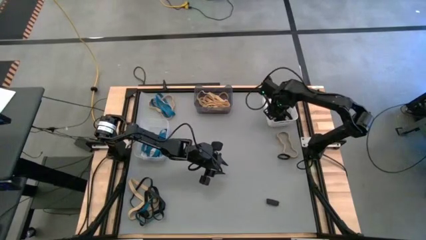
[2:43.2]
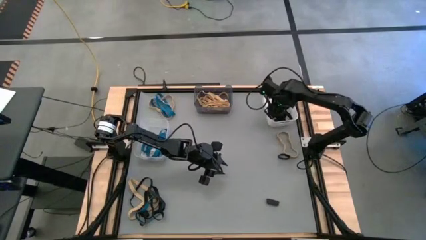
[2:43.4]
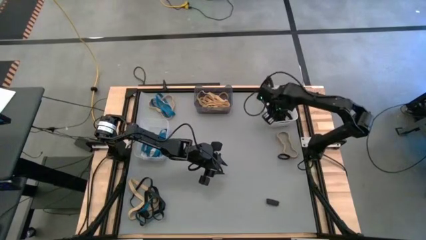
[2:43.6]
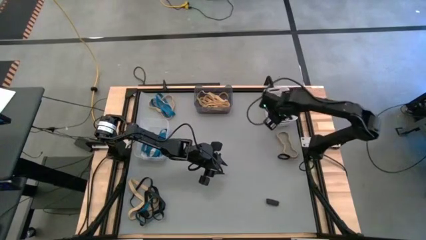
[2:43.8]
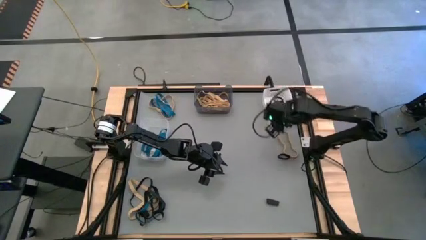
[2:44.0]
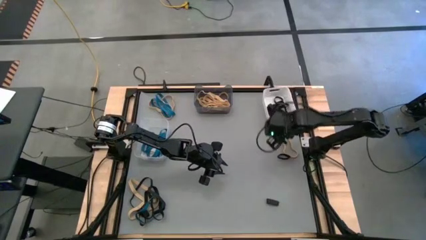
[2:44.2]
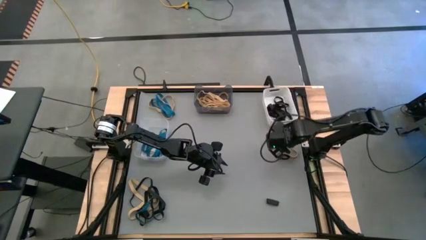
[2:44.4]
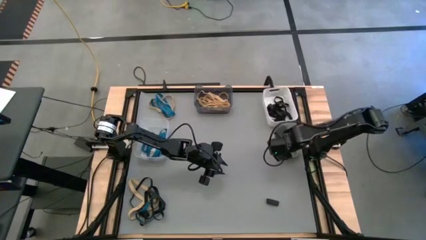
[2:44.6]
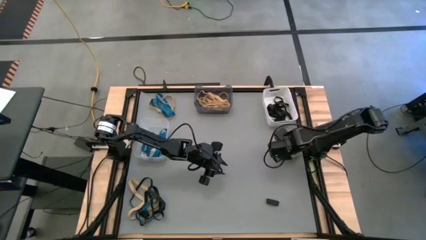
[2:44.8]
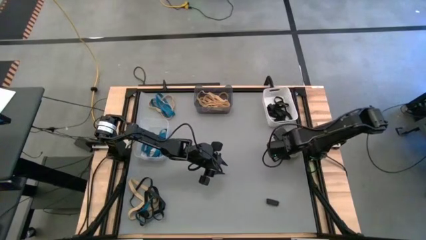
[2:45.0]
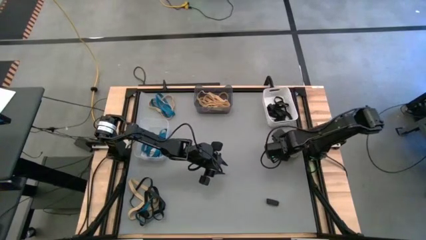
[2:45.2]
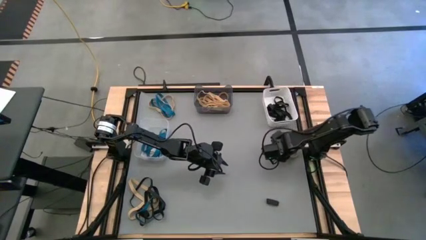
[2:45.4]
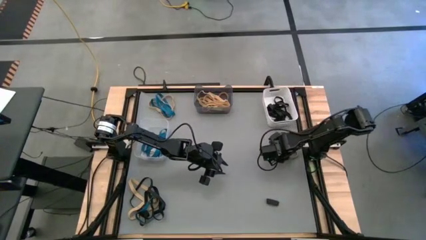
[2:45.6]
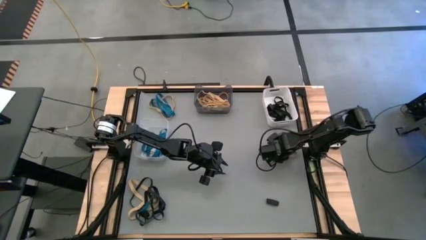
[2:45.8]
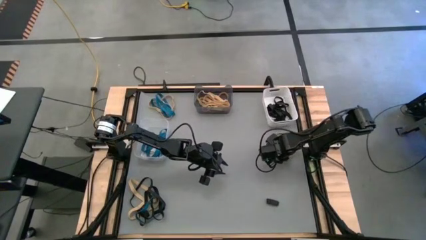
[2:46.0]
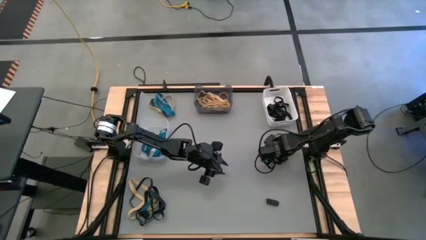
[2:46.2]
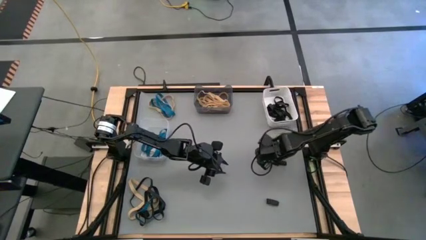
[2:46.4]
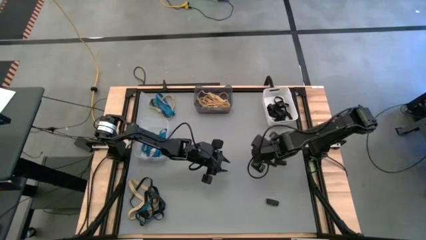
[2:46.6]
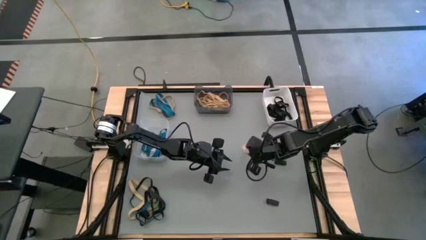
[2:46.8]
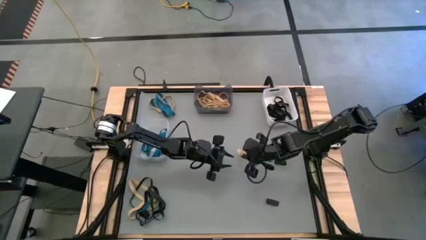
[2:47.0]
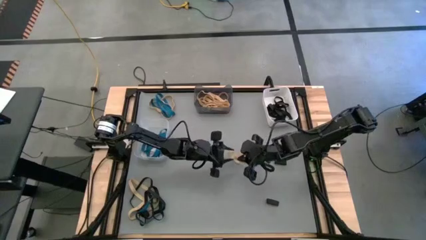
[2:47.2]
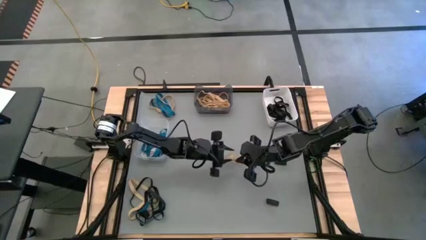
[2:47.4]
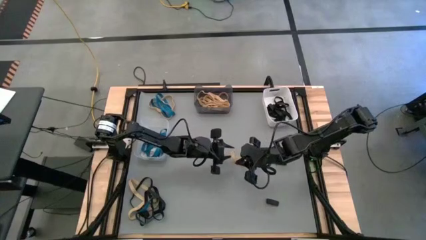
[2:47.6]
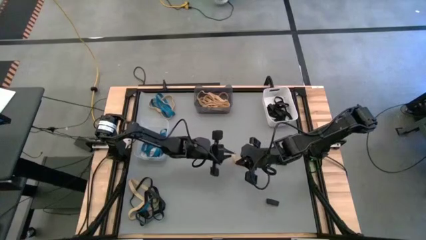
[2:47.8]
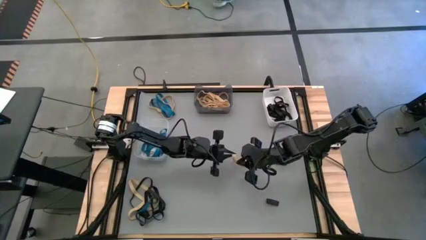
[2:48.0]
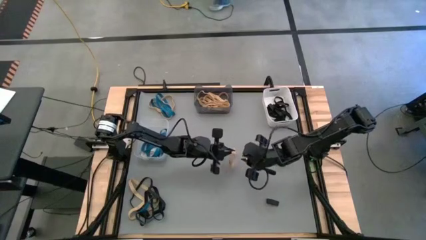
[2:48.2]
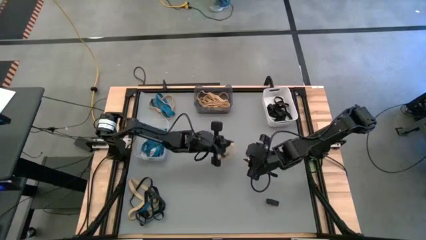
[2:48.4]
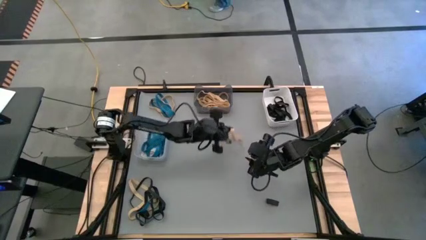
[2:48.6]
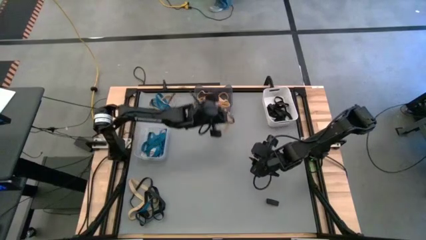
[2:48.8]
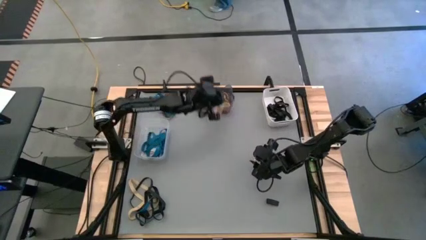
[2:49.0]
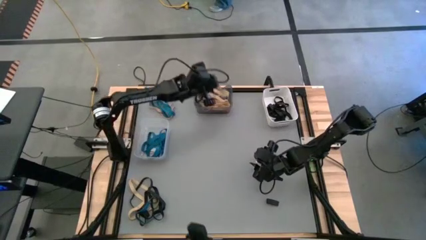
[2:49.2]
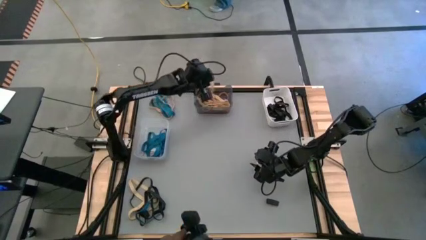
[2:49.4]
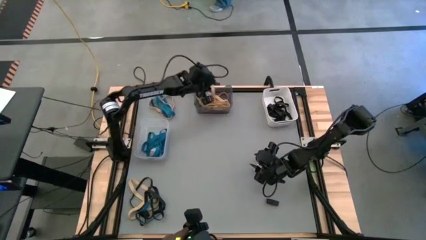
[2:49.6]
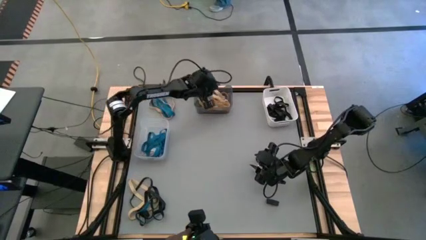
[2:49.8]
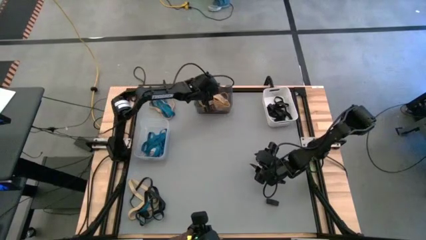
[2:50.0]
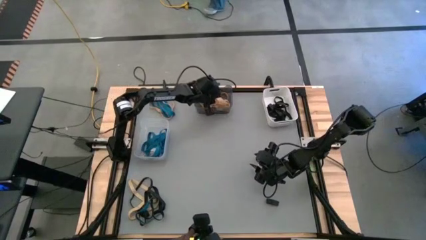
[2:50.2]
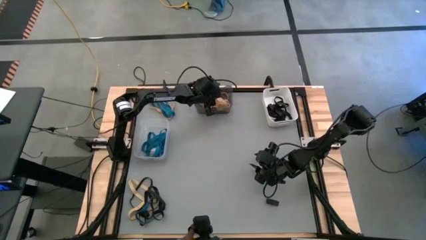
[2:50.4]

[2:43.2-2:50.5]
Task: Sort rubber bands into baskets
Put the brown rubber band into the black bin

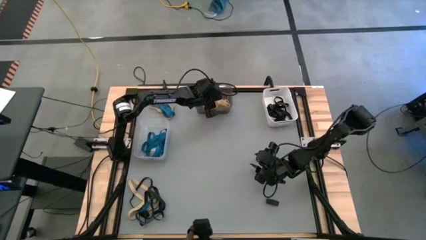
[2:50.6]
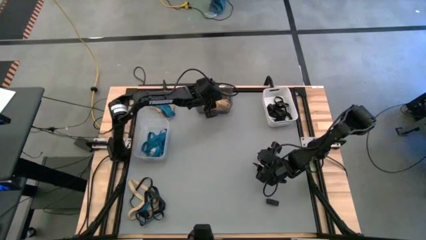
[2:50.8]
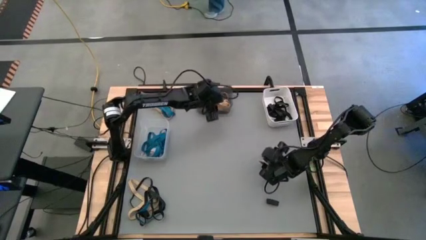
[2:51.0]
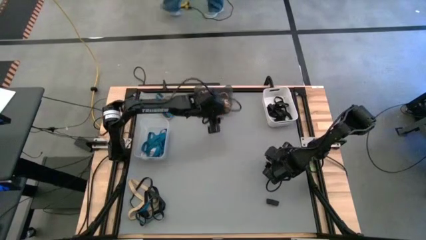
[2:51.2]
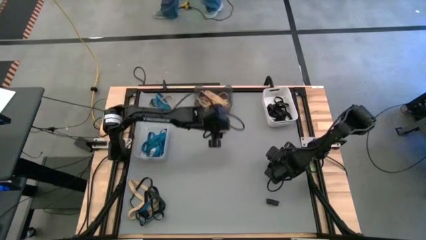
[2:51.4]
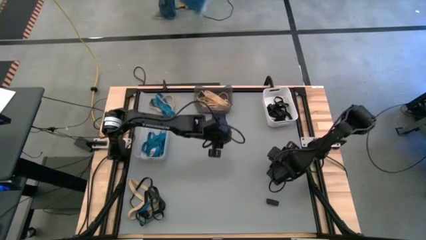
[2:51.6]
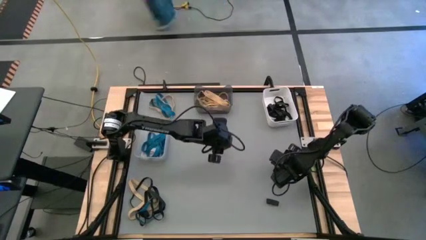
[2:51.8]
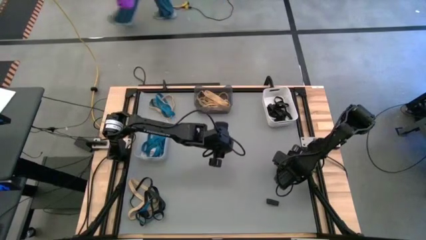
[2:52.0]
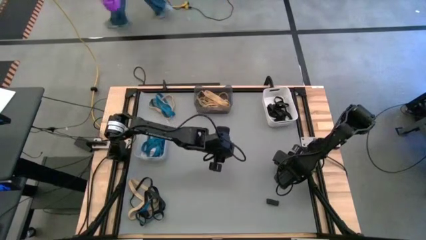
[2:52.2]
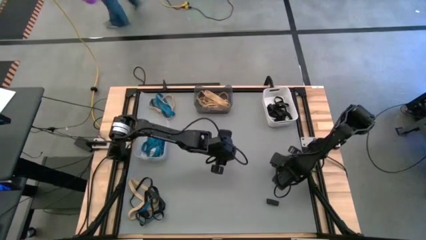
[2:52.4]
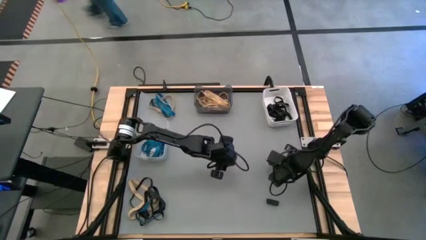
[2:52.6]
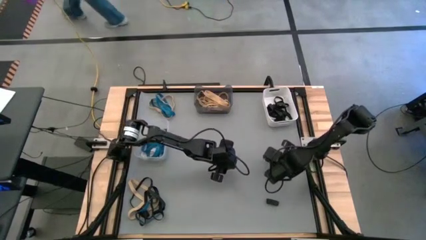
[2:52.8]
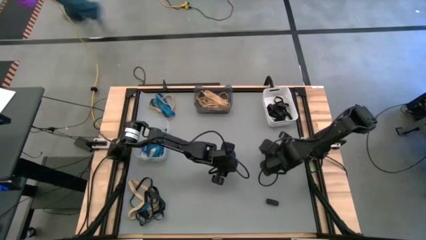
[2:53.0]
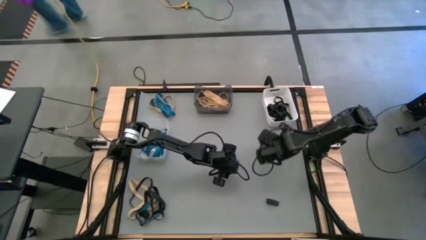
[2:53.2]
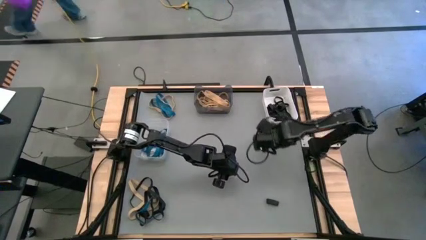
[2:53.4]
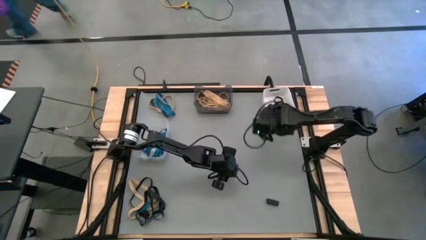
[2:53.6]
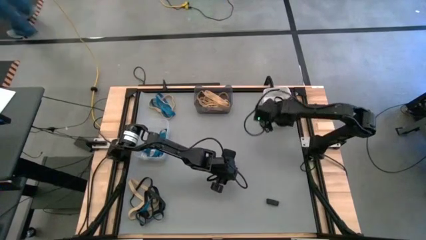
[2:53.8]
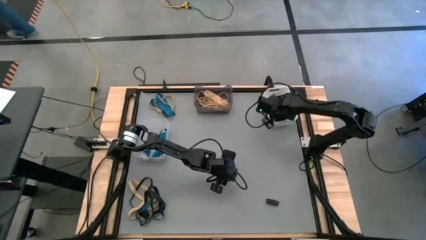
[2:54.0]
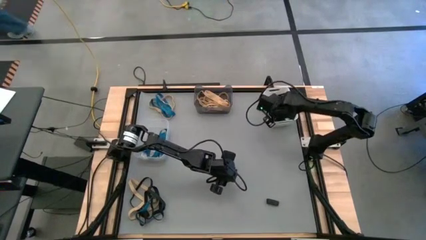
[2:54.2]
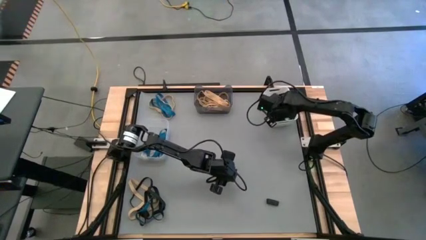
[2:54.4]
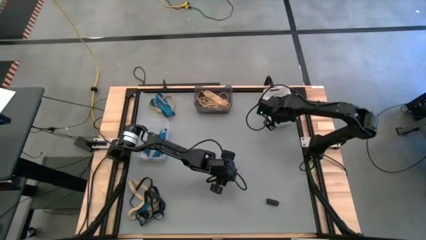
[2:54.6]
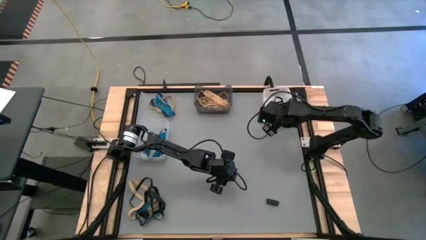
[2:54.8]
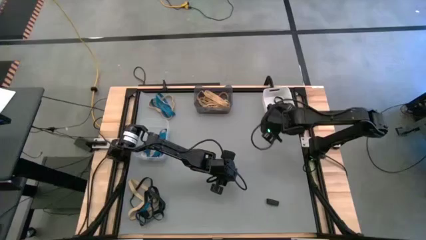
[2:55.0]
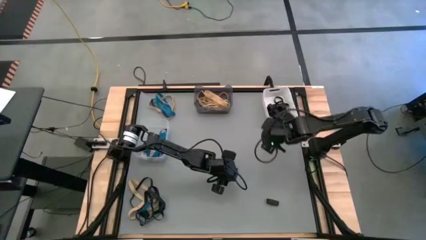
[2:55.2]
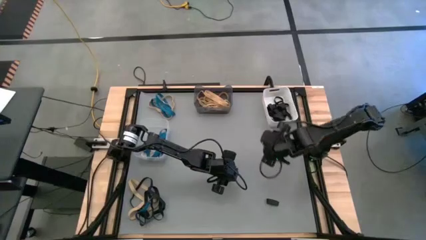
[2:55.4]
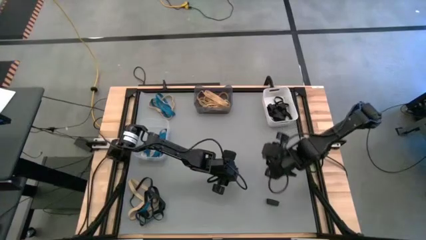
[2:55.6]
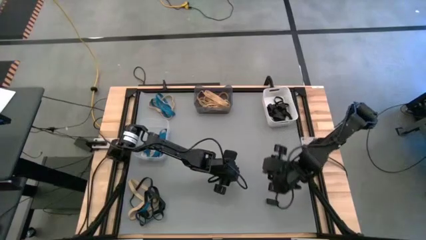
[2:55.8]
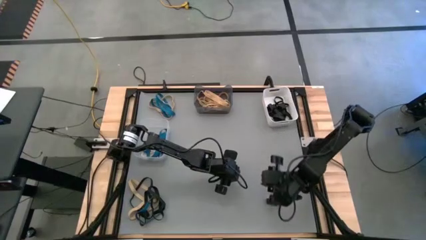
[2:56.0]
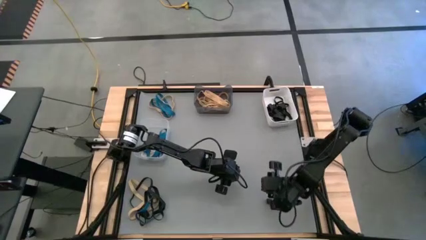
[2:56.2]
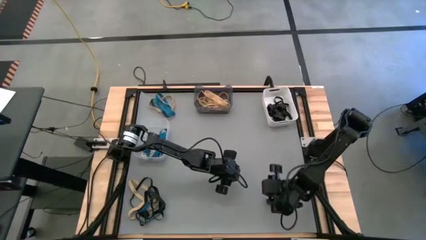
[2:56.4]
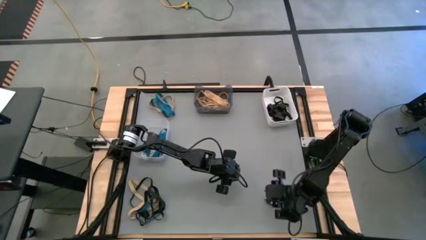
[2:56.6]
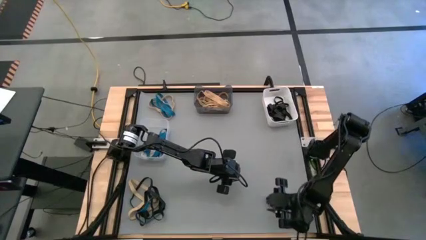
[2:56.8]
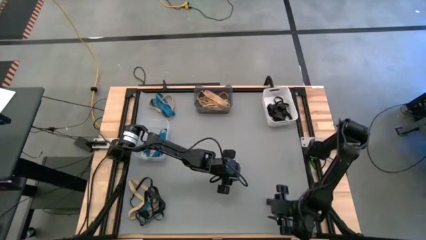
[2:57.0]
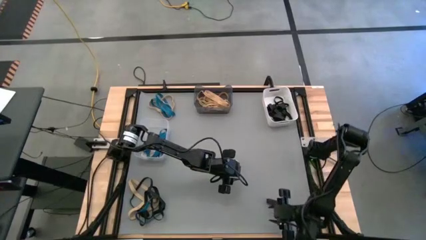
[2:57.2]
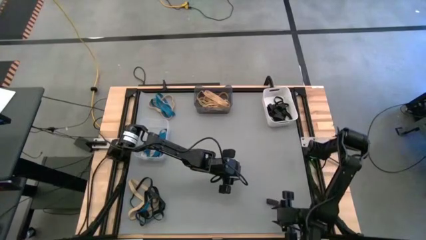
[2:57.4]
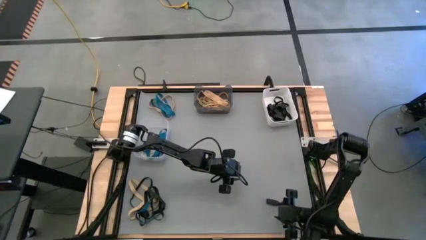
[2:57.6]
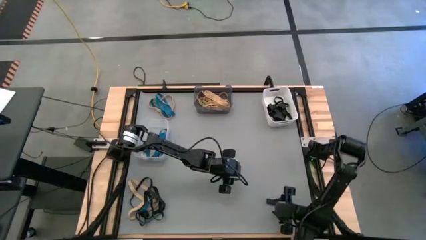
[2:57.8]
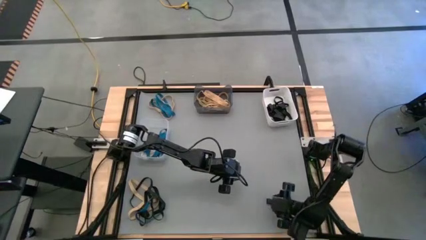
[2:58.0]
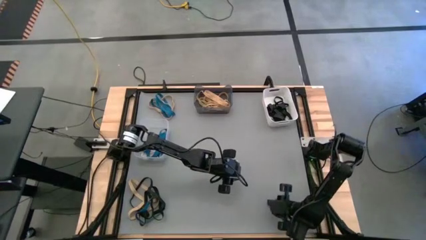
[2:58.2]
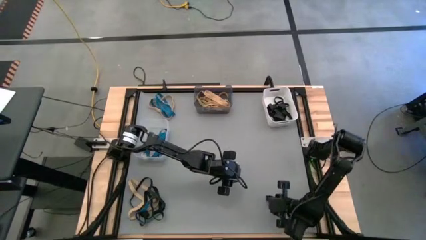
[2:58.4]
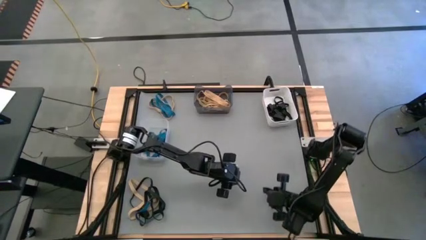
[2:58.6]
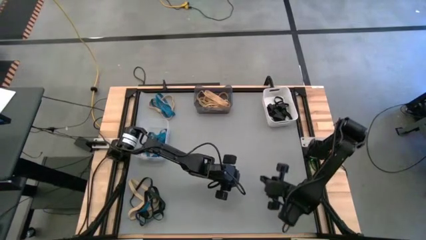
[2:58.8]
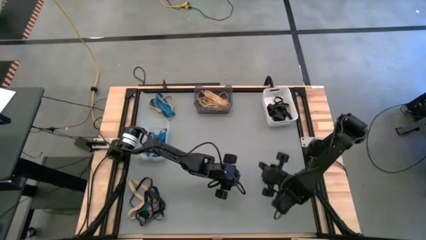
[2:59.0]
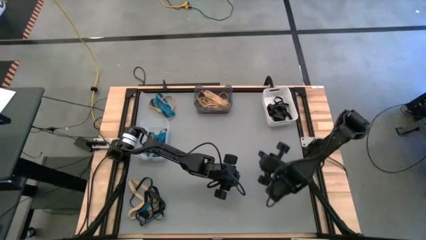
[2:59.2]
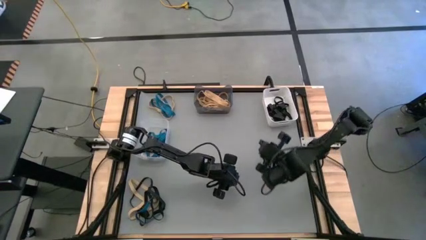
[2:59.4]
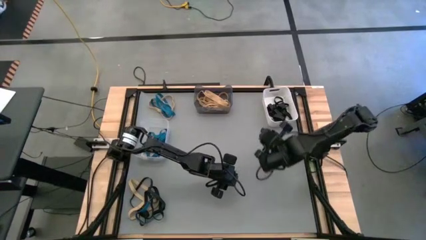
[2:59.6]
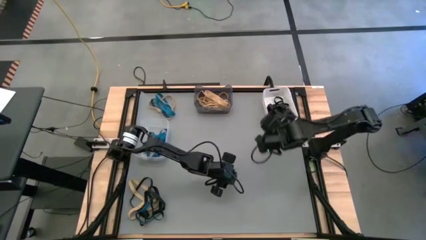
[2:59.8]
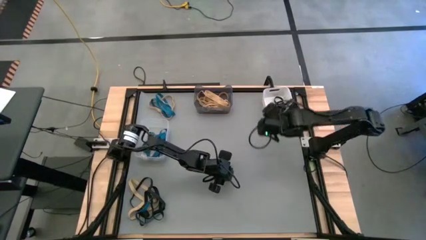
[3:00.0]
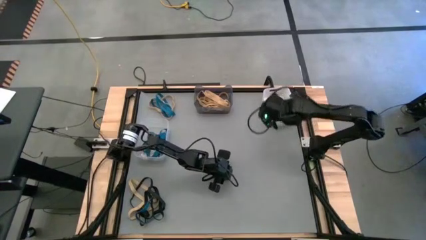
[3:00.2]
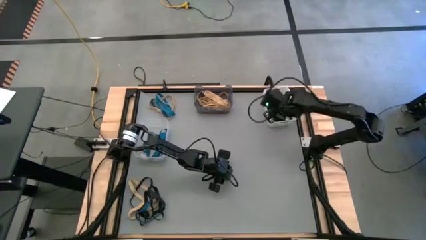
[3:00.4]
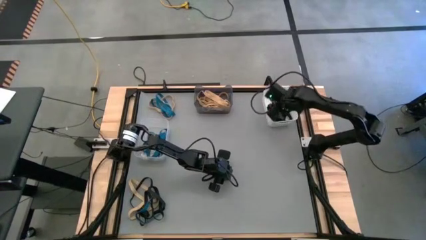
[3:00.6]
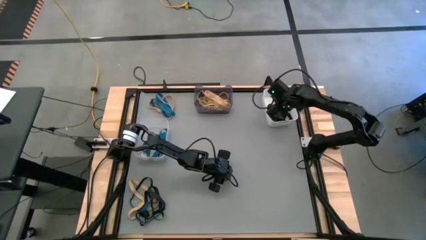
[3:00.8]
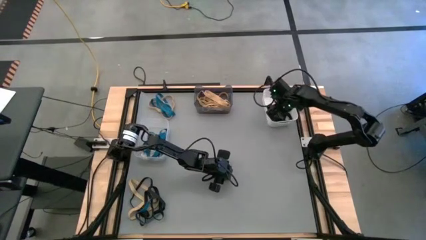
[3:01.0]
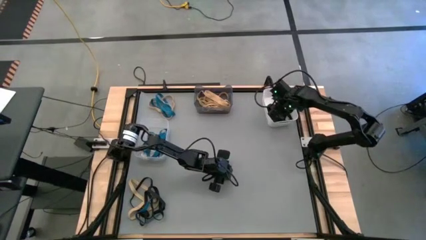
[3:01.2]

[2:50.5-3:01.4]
Put the black rubber band into the white bin
